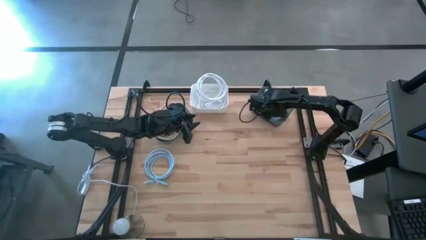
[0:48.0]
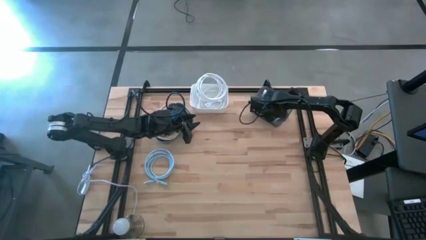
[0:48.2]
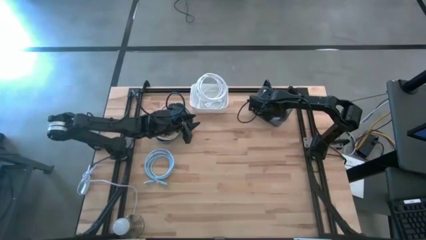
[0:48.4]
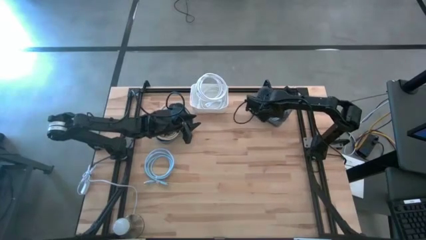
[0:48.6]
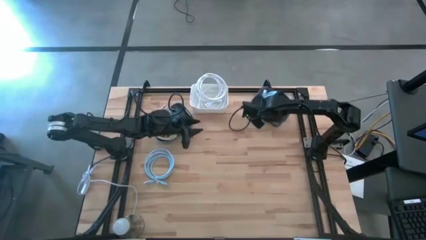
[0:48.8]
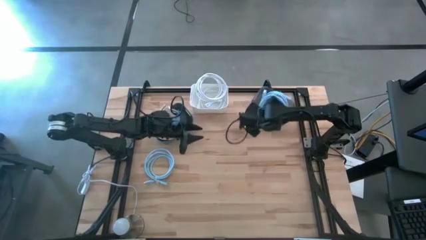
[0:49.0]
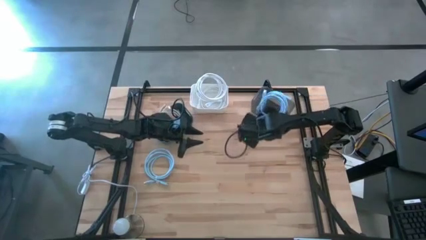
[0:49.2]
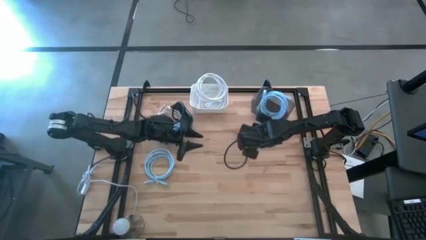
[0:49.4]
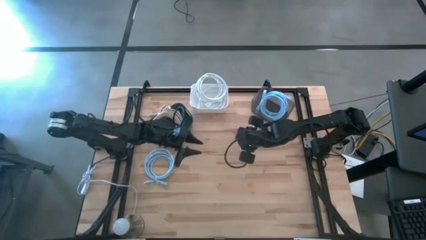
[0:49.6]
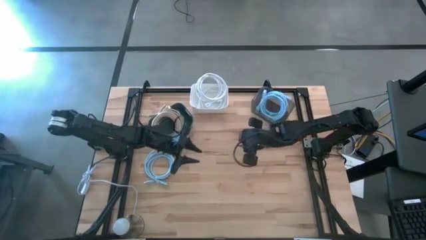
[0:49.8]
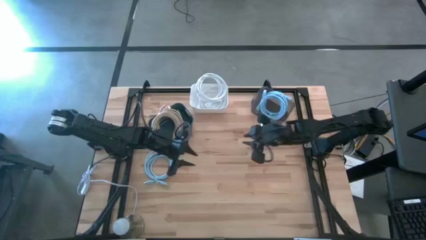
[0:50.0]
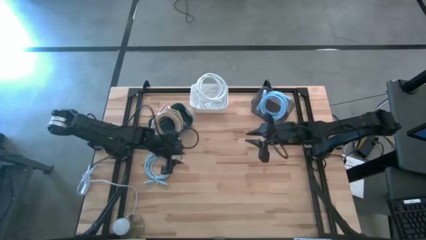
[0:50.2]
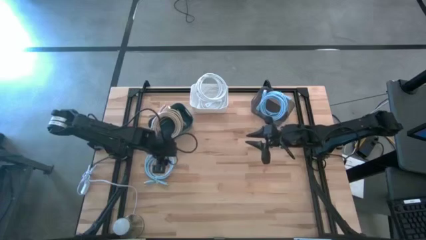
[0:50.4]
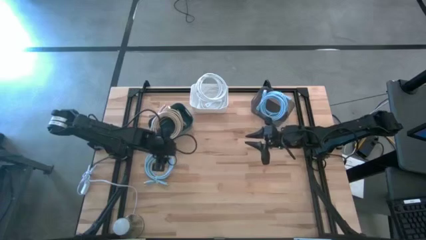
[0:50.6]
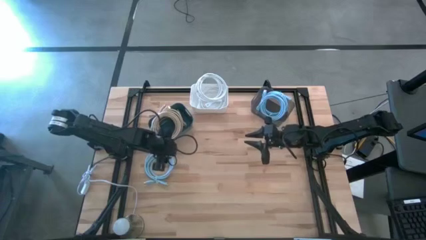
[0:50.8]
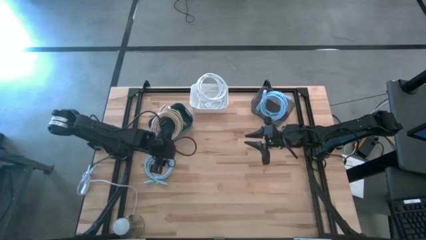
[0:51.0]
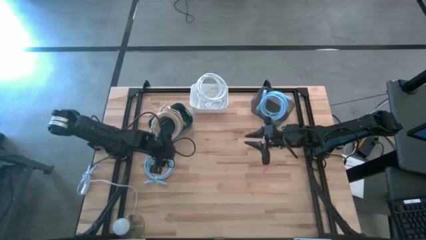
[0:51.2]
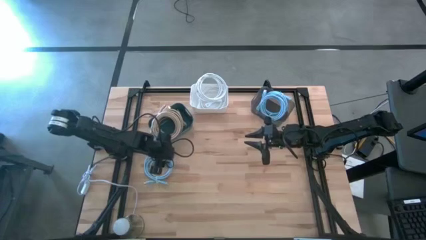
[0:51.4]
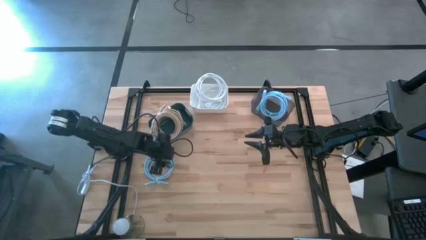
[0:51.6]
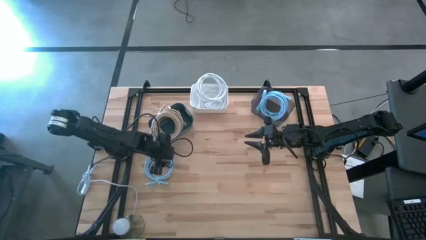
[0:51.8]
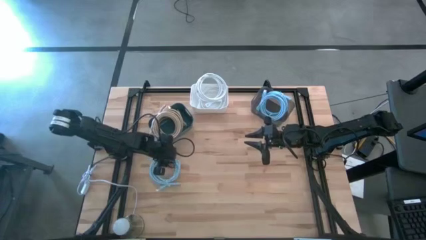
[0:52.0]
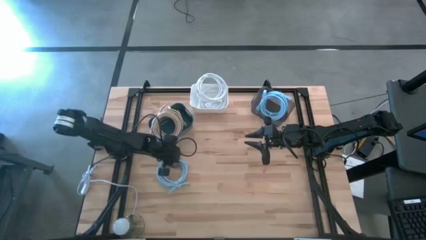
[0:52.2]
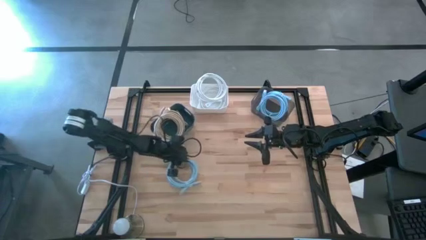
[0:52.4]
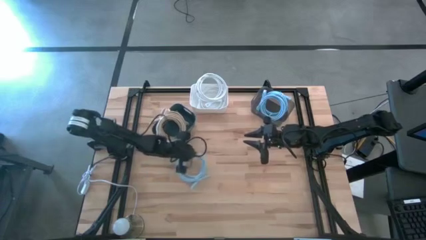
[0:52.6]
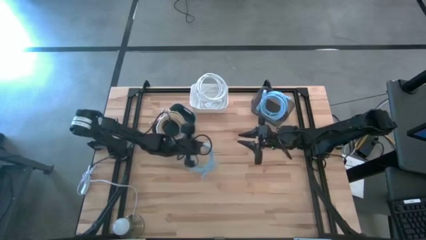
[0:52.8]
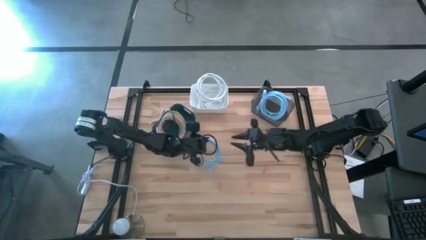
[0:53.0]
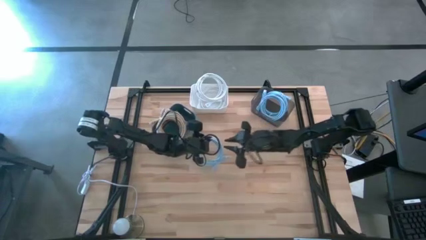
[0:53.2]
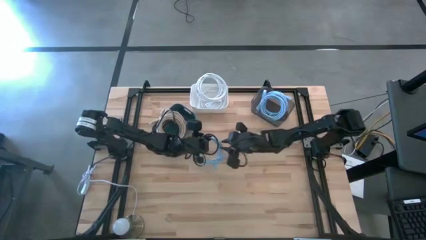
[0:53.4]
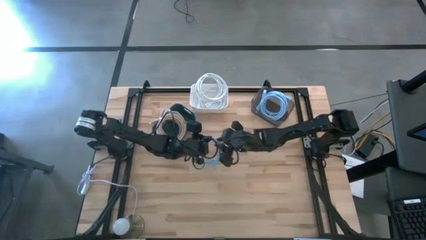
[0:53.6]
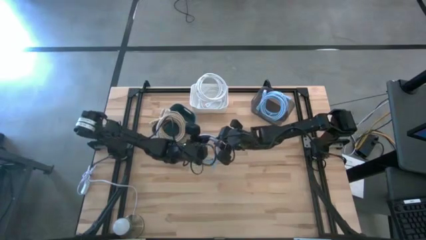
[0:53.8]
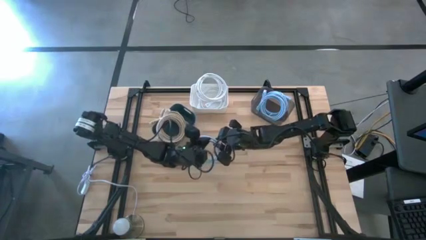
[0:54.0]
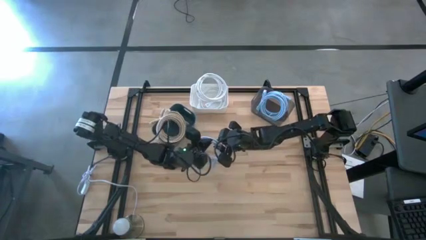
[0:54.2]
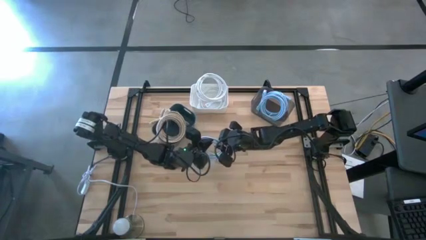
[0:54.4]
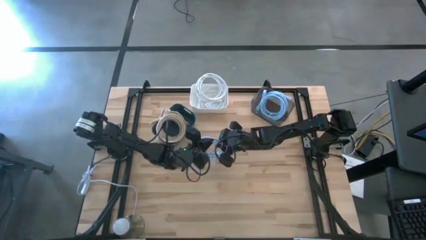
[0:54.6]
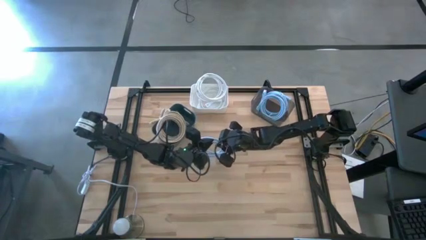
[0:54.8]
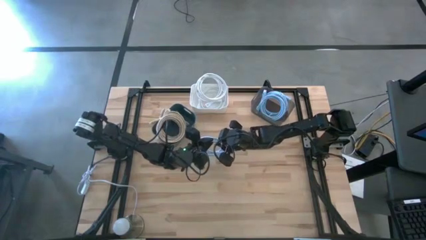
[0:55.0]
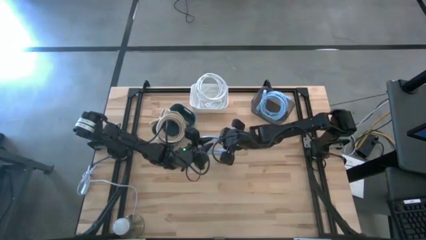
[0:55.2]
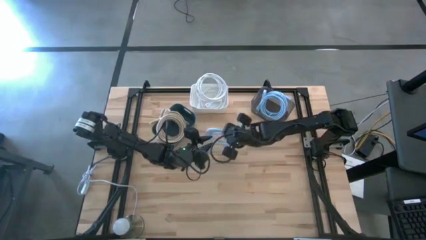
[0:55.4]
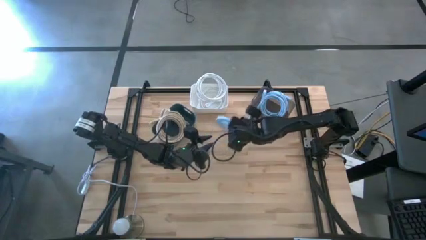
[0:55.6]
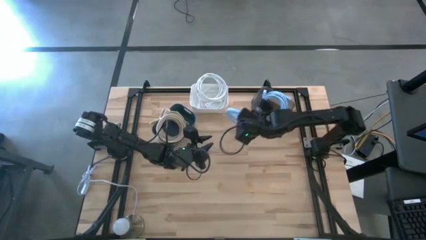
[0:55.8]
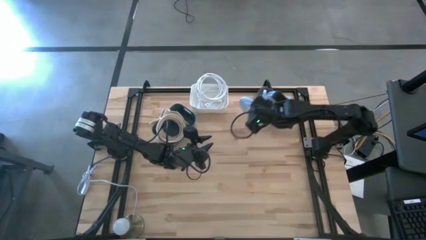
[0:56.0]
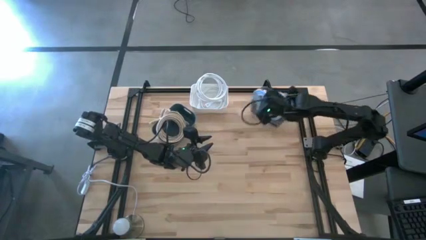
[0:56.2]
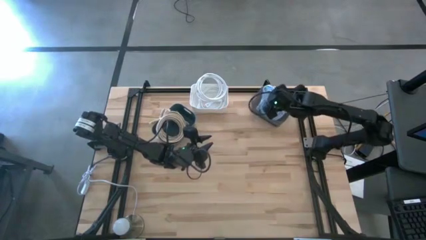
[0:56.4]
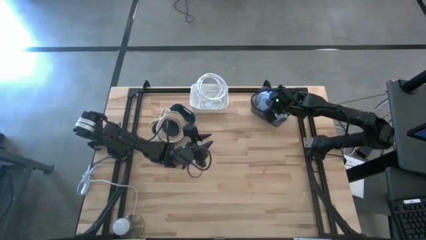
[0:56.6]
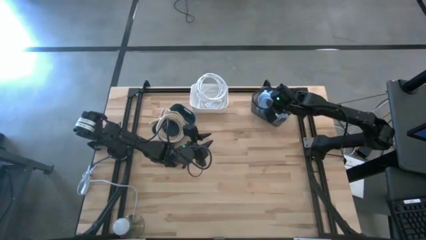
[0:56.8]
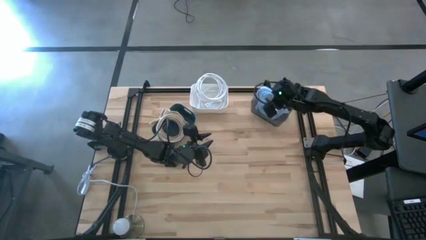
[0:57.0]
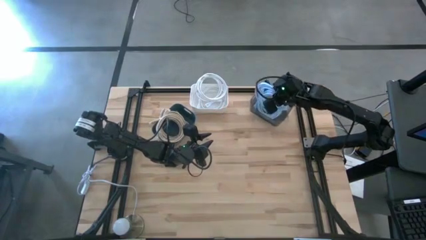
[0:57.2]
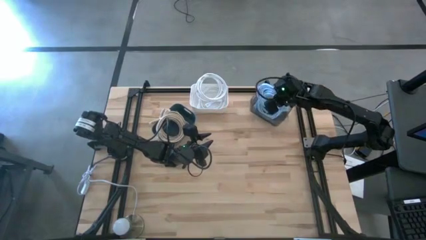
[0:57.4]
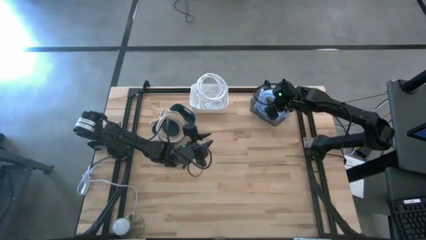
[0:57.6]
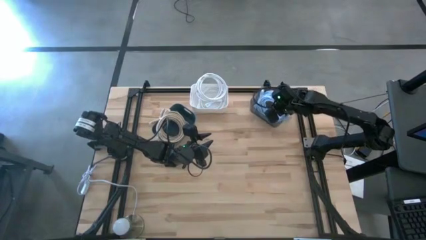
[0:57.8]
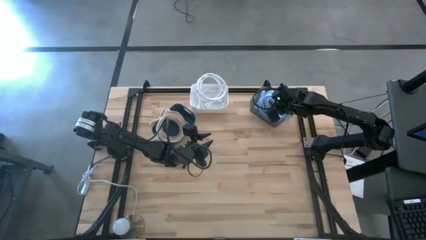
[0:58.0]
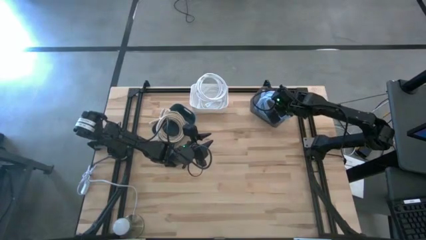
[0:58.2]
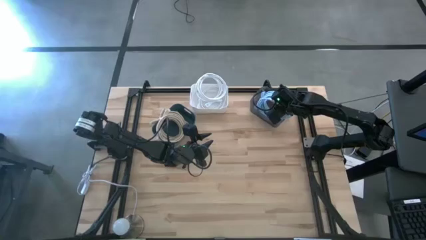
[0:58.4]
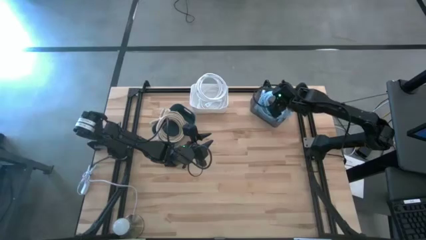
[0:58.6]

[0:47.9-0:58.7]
Task: Sort HDMI cables
Put the light blue HDMI cable into the black bin

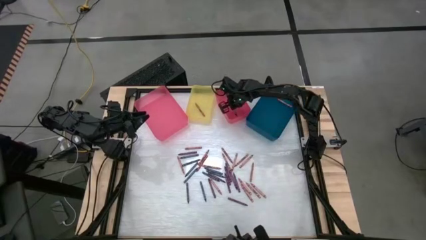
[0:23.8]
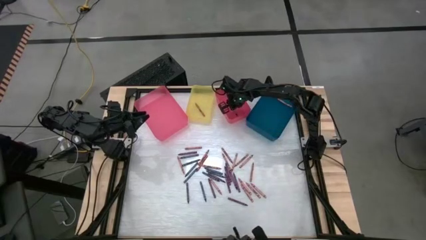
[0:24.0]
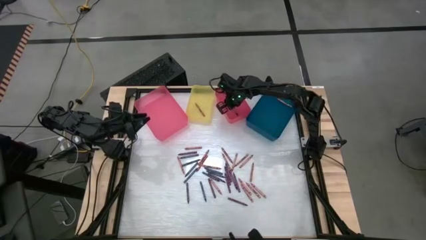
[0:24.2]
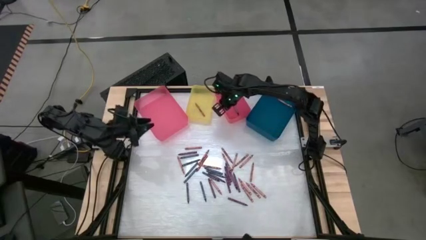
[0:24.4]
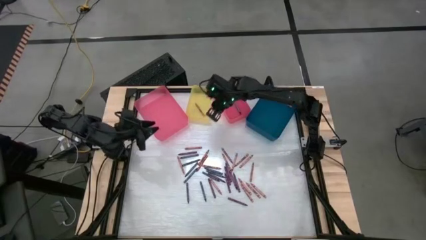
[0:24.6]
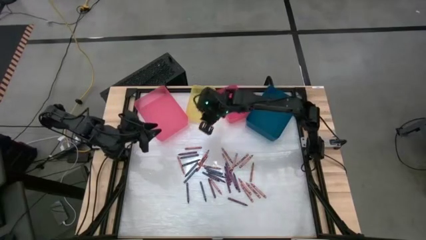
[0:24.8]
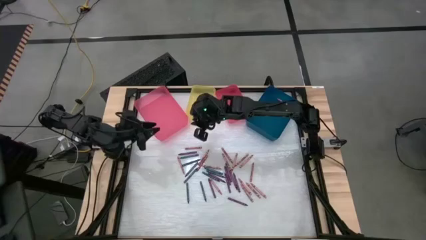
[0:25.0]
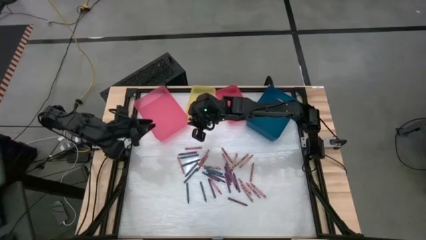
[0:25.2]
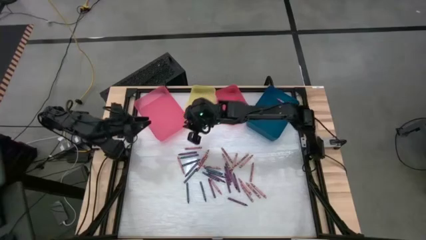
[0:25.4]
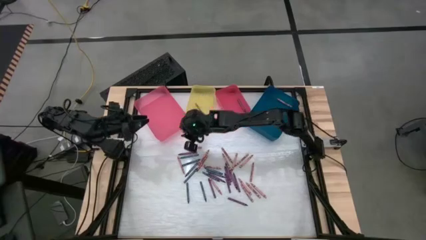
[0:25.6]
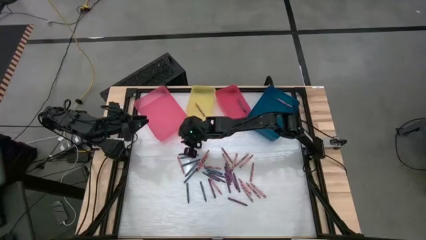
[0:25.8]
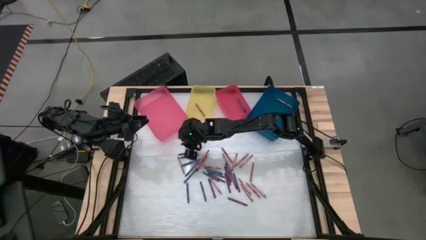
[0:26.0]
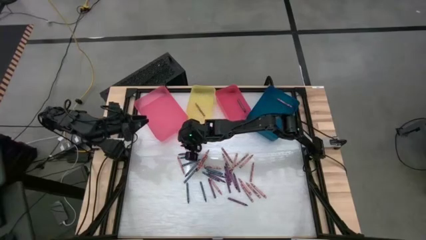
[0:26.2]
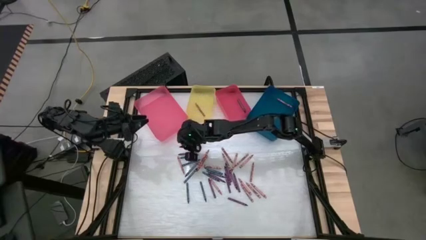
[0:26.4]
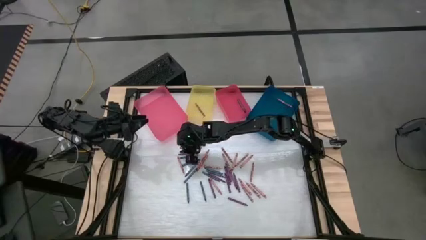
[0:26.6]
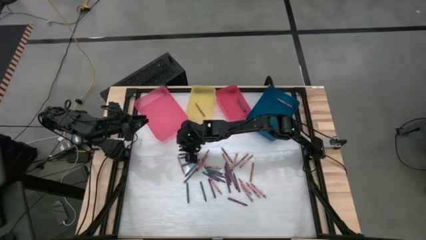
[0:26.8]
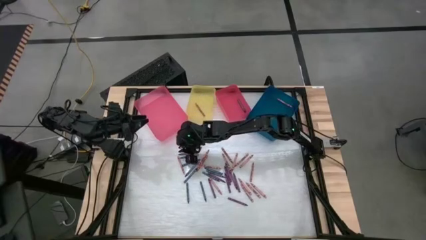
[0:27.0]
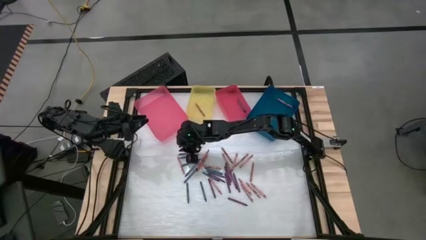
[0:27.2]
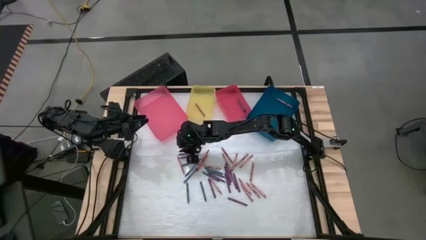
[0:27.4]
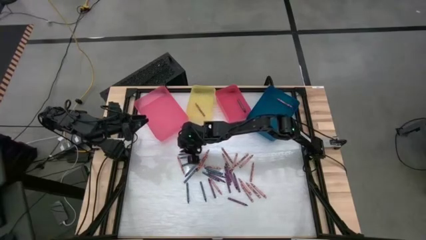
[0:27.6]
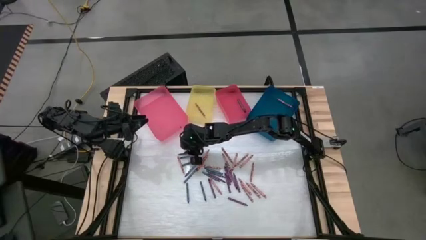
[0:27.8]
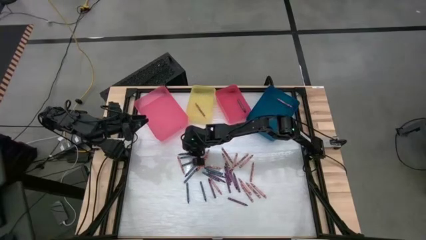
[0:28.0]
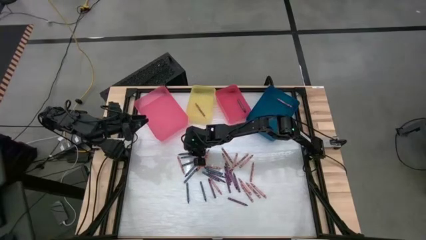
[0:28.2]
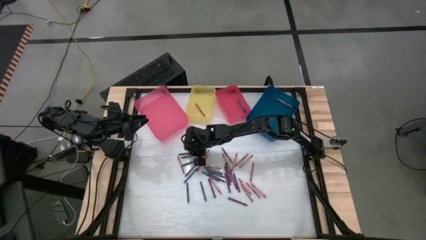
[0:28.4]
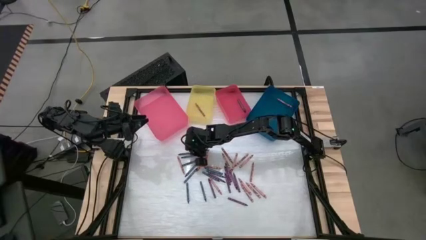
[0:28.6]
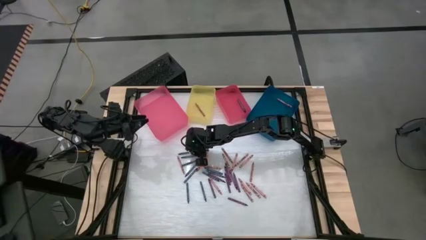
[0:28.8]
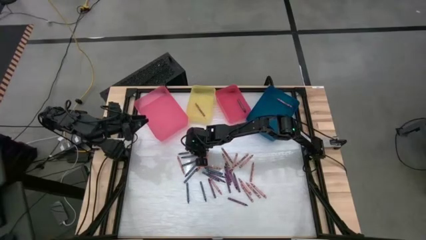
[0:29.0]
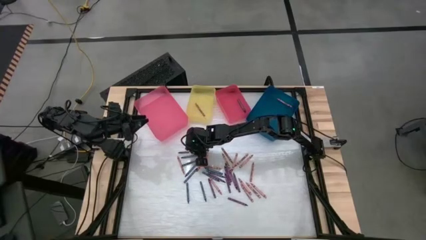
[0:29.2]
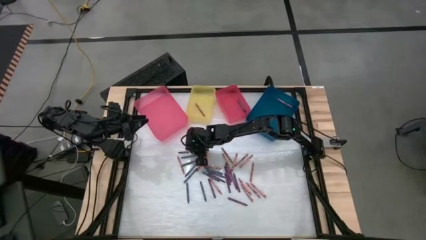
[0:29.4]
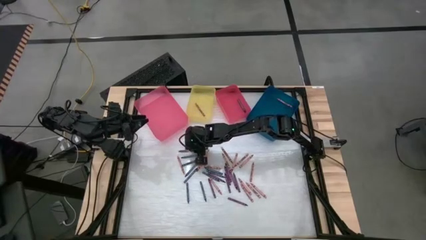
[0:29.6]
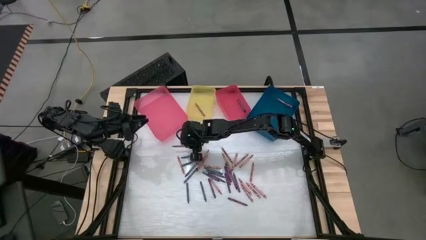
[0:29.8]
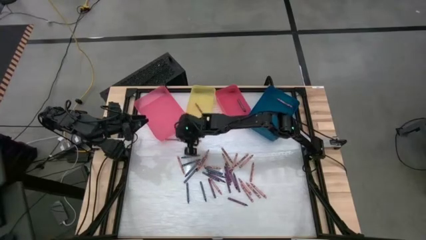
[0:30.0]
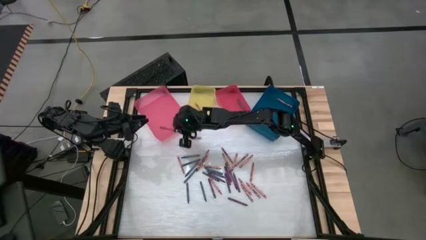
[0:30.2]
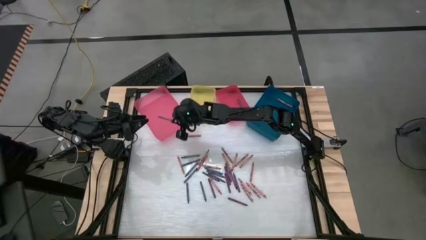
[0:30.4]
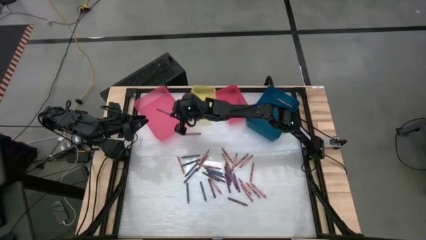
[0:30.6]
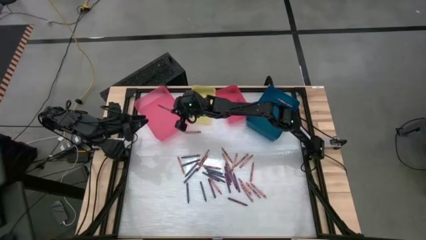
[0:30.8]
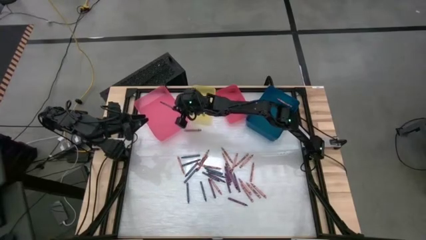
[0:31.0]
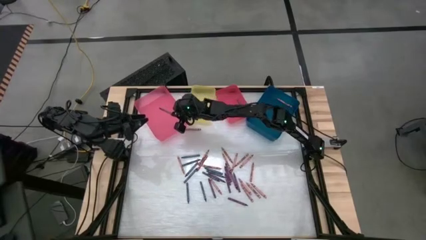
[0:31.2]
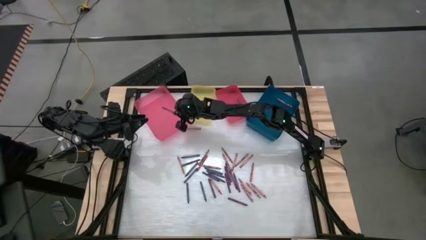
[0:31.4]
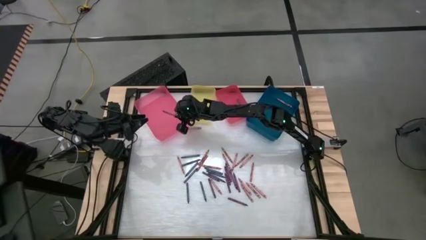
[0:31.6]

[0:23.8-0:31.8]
Task: Sort crayons
Put the violet crayon into the pink bin
